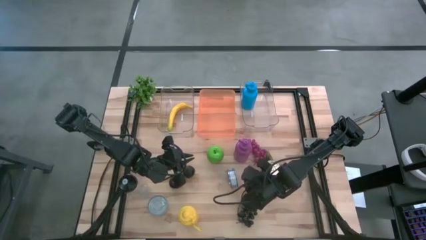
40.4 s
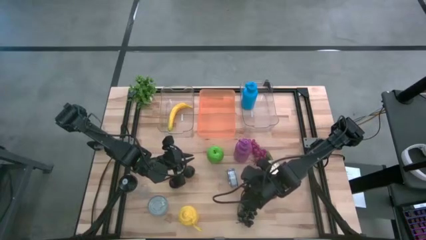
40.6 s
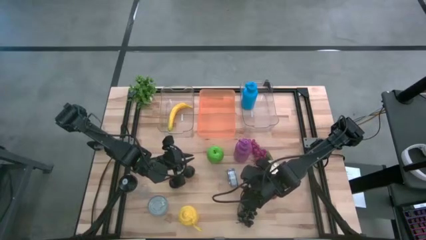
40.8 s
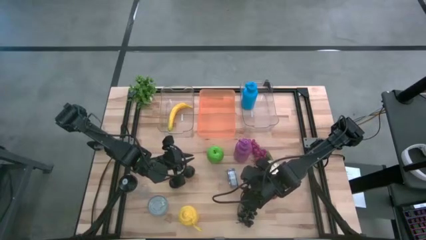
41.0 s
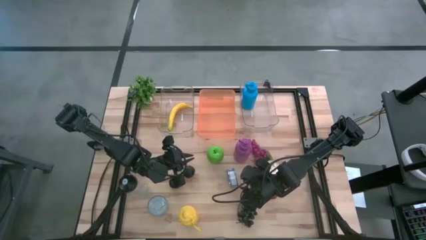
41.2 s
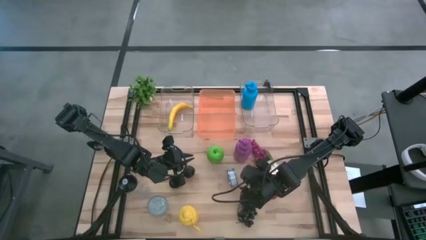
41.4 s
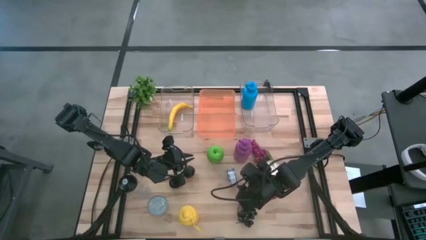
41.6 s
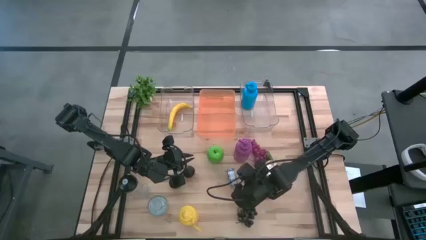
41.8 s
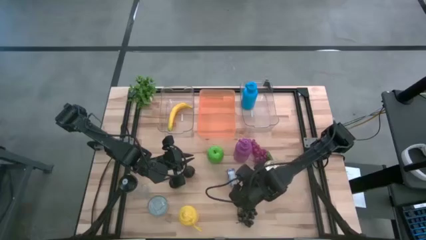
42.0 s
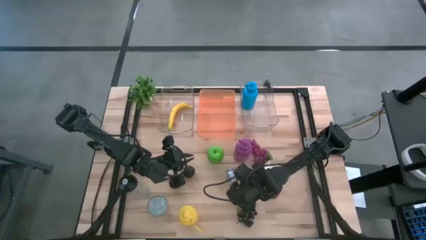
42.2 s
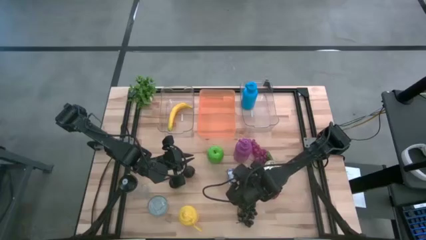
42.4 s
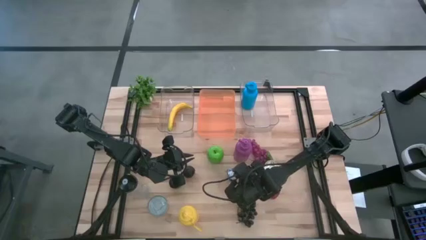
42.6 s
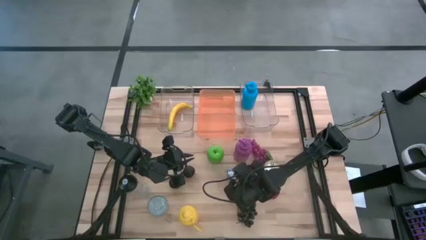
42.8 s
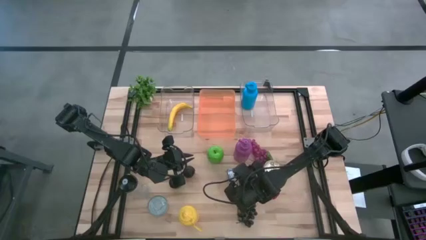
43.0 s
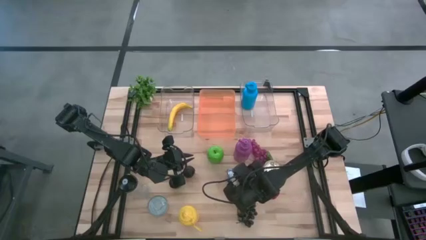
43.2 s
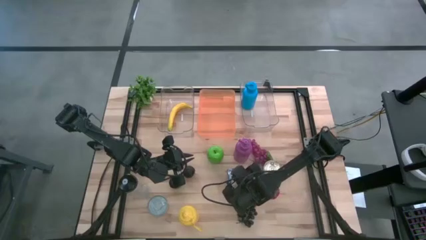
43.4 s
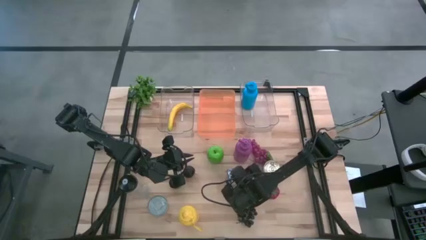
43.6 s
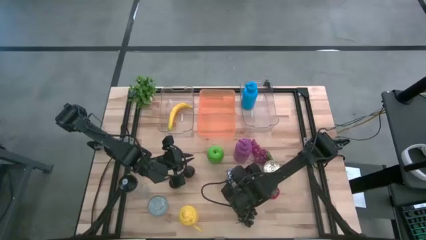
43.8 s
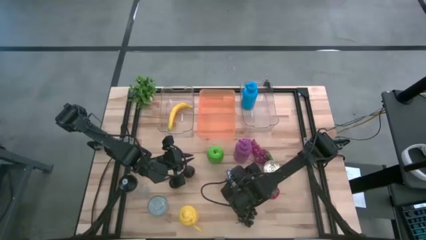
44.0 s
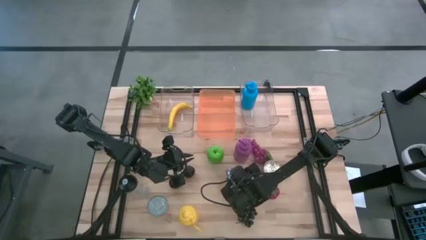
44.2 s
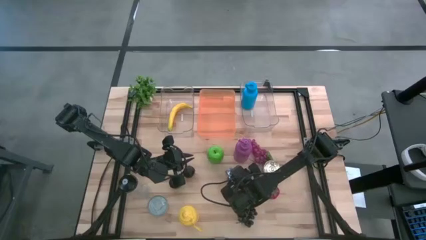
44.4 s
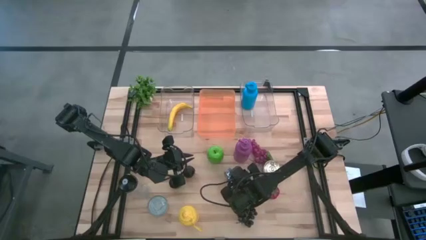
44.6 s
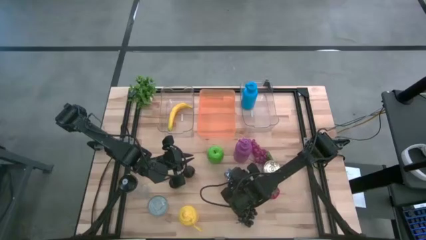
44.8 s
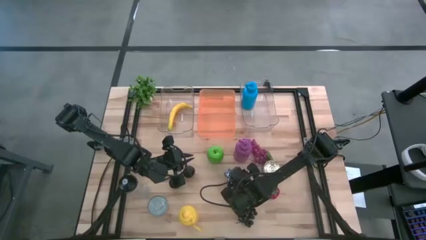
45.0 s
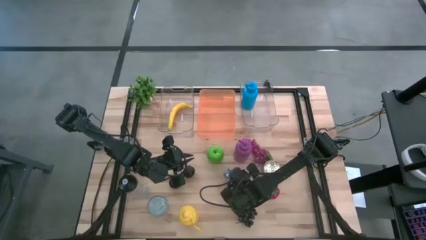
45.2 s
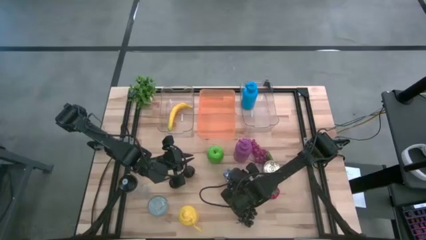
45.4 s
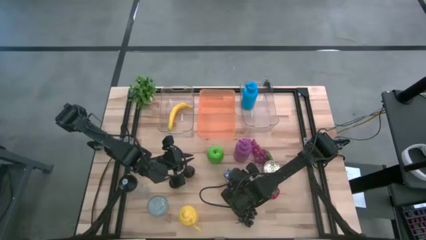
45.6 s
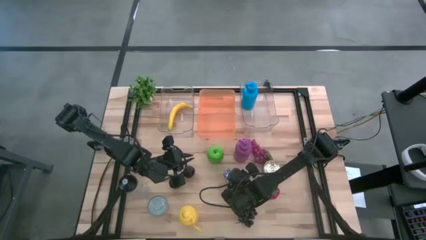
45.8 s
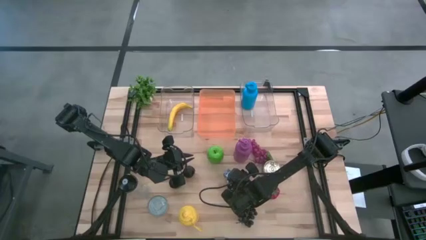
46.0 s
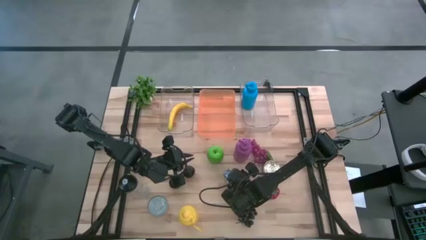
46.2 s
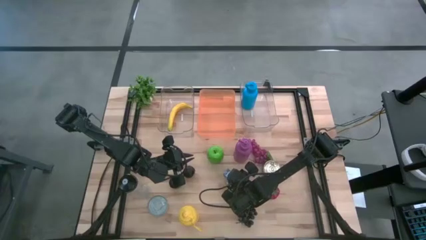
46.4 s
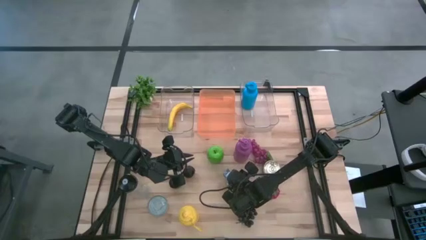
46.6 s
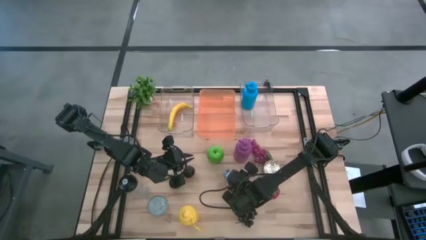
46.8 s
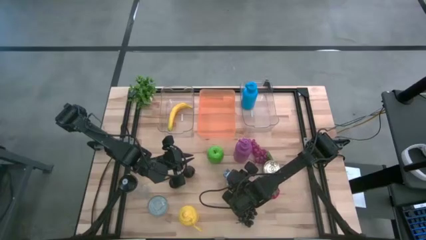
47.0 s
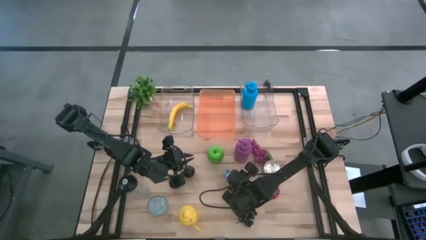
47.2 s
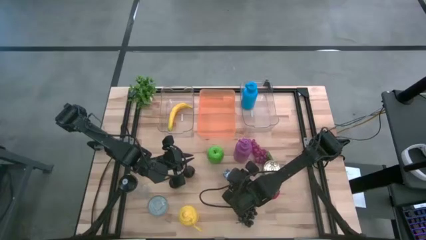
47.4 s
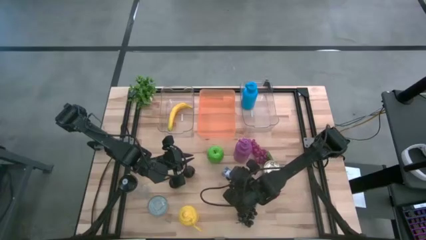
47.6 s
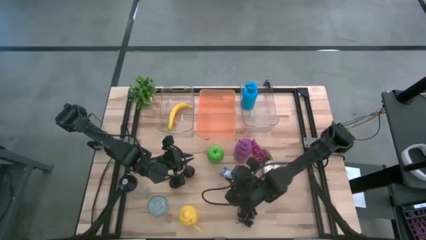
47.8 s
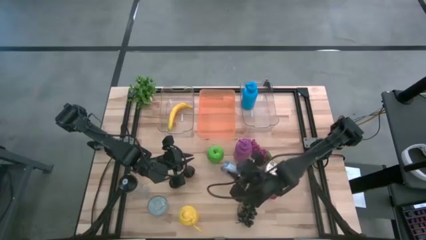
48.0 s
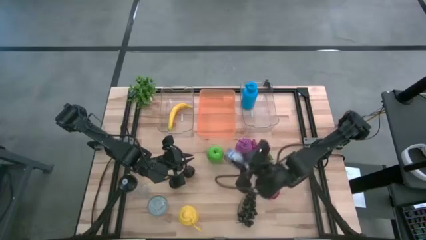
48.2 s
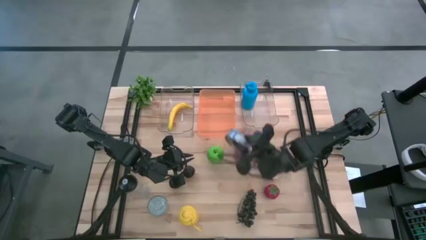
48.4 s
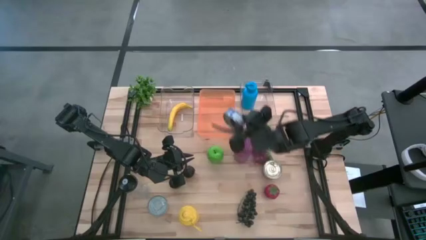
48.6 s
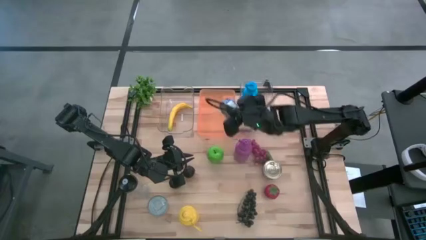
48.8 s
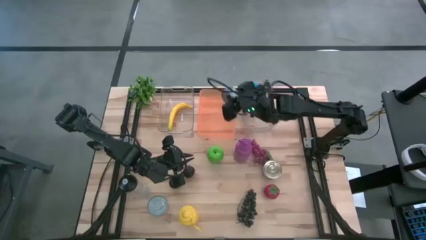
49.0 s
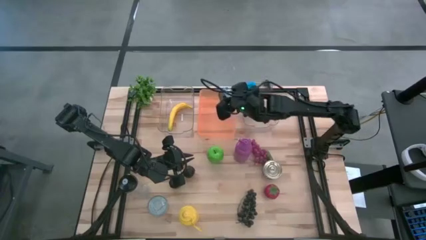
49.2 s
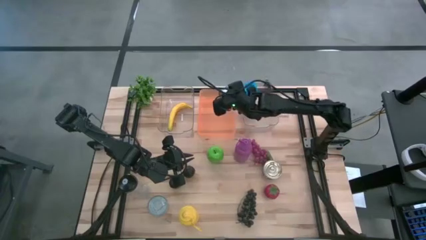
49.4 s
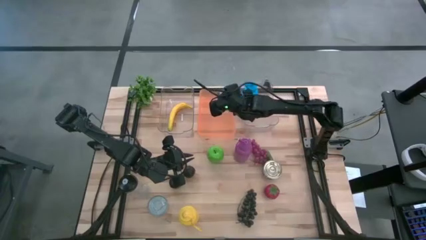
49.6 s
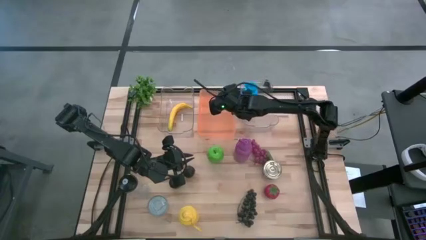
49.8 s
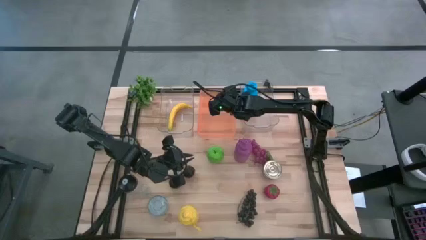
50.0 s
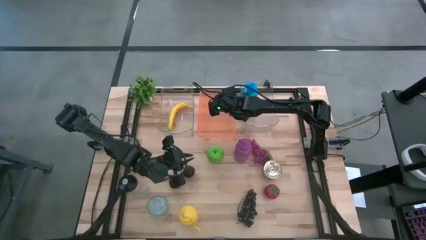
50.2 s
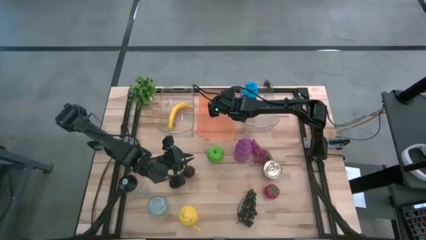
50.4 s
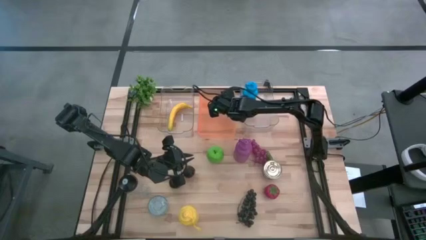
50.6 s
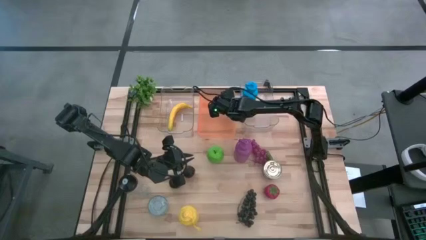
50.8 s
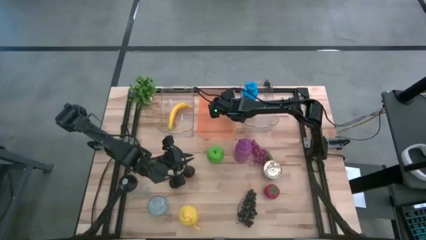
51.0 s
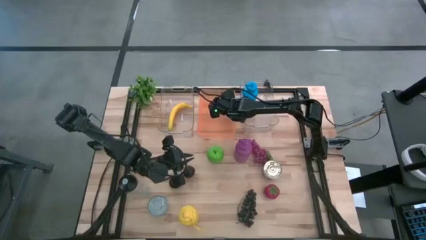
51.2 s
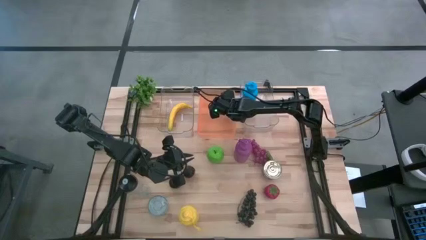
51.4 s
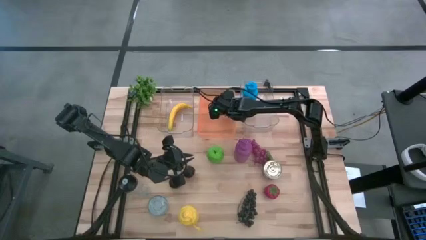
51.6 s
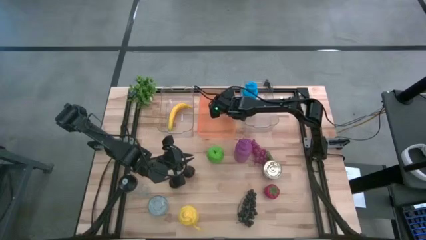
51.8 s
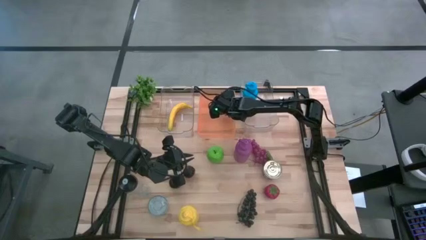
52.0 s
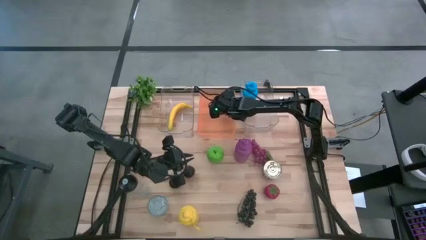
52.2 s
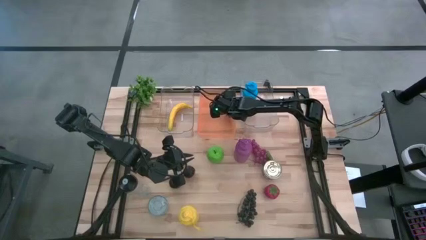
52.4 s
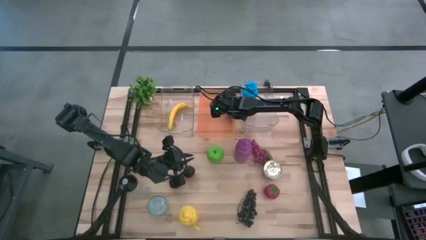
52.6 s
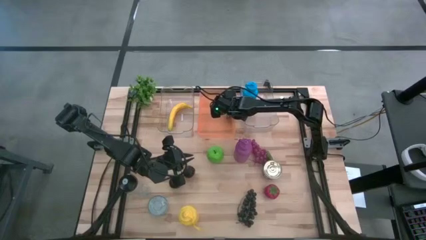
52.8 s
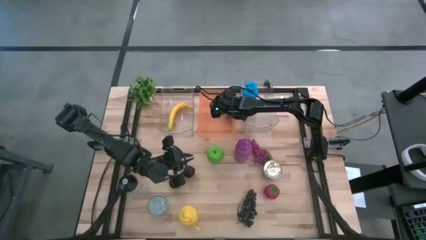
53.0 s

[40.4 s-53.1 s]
Task: Pick & Place Food Item
Put the blue tuna can into the orange bin

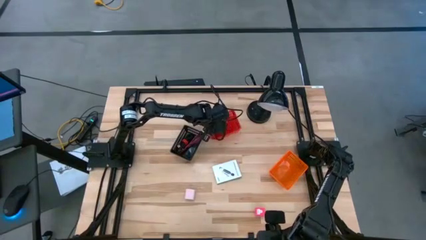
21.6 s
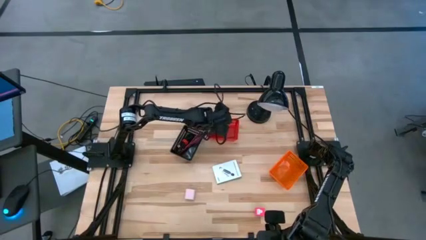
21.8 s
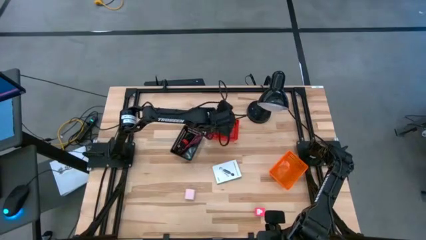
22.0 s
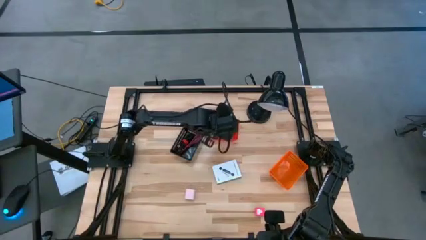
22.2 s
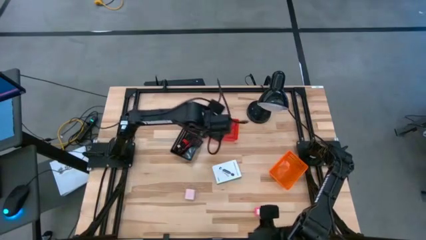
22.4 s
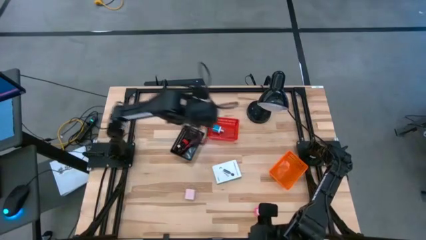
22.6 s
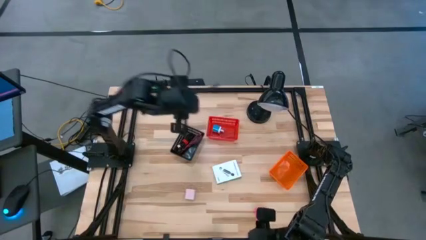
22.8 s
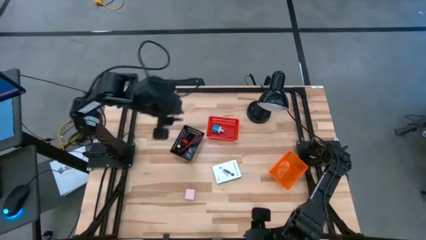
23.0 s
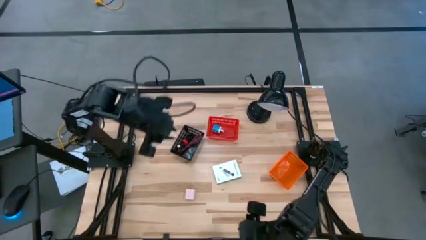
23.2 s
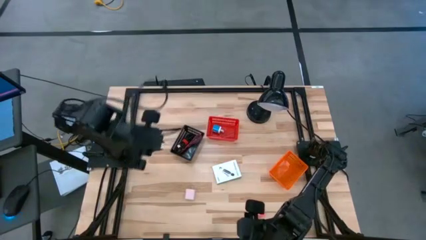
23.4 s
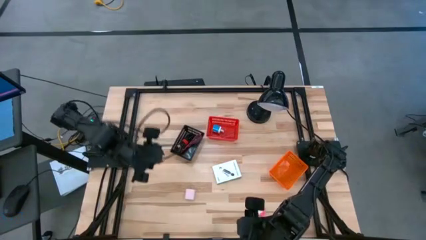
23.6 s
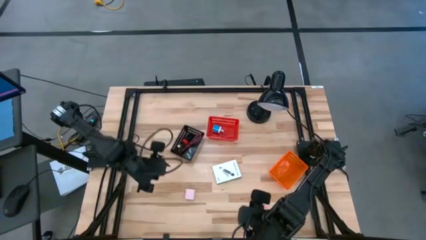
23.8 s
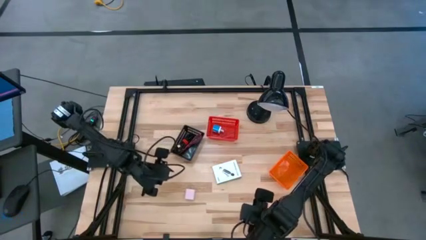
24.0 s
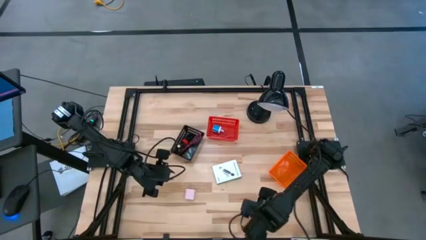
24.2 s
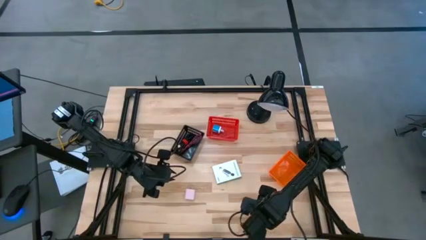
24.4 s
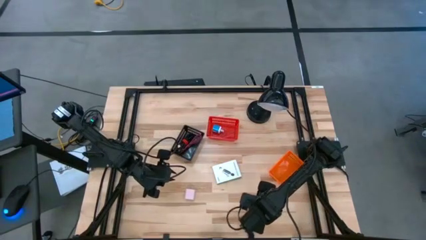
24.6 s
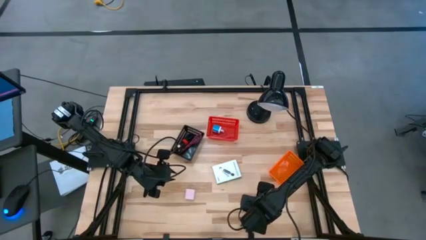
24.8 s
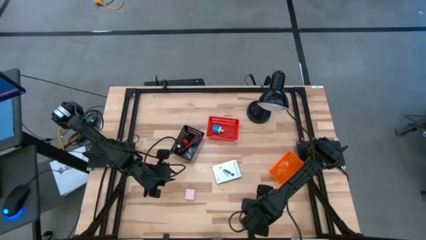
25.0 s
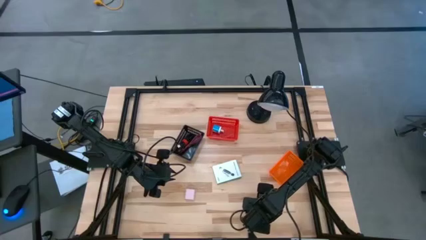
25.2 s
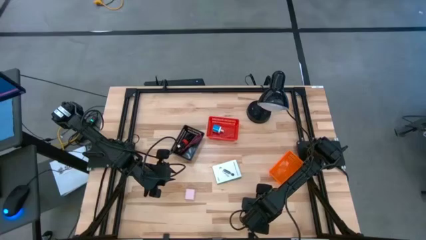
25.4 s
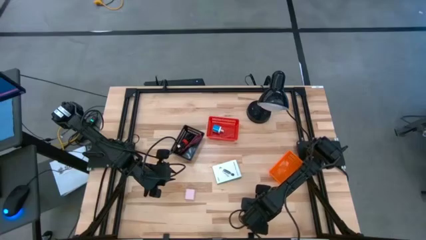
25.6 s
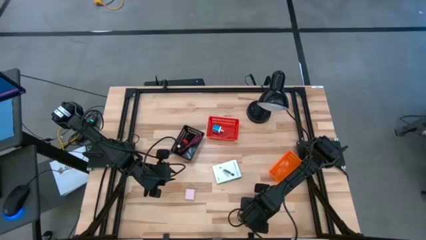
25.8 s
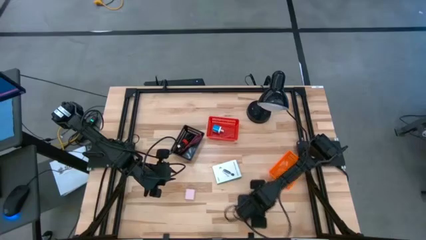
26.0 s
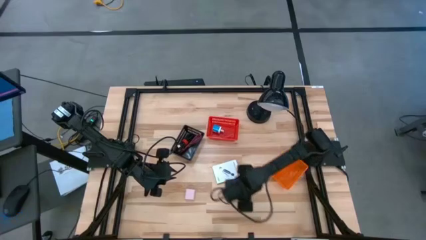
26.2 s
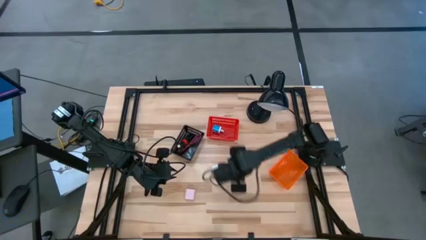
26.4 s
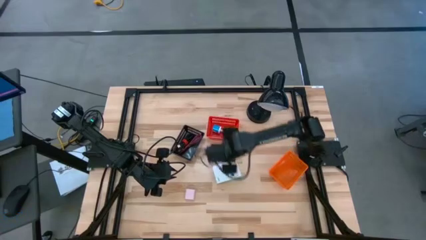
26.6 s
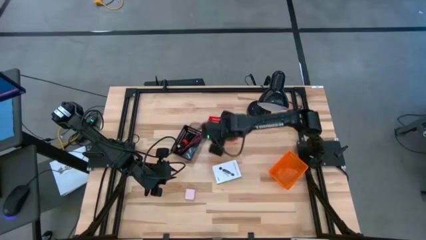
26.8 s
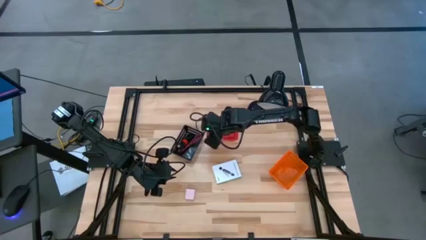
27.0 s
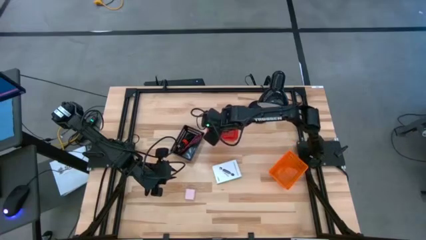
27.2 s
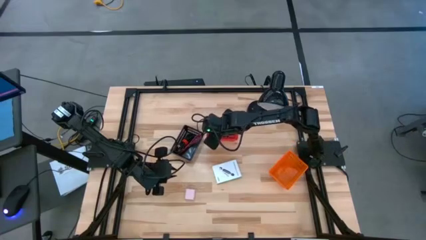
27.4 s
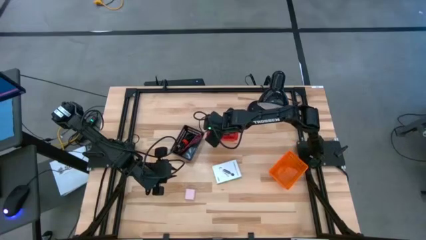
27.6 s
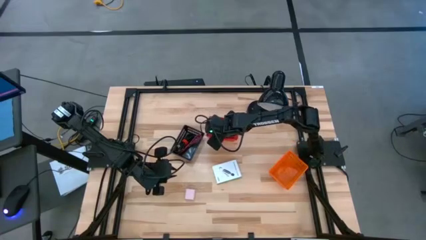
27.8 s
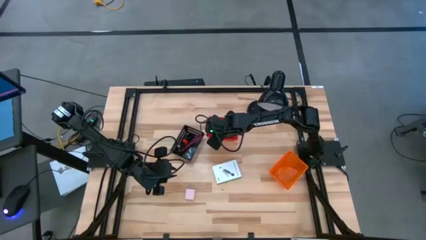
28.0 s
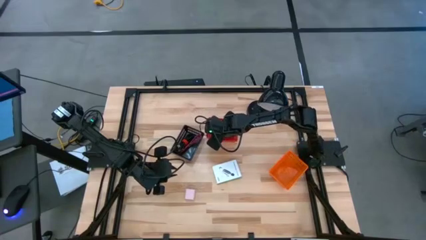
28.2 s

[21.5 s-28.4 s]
Task: Pick and place items into bin
Put the pink charger adapter into the red bin
